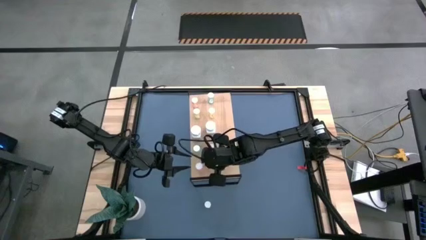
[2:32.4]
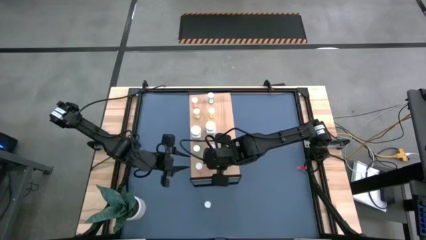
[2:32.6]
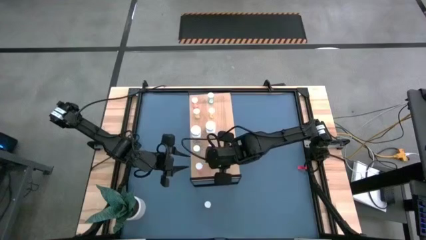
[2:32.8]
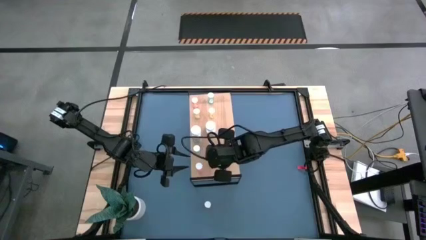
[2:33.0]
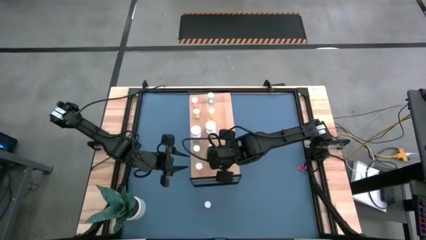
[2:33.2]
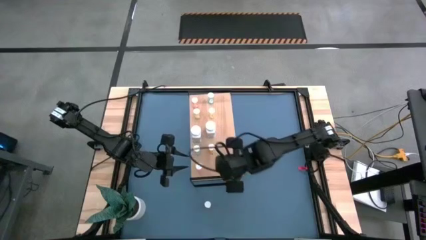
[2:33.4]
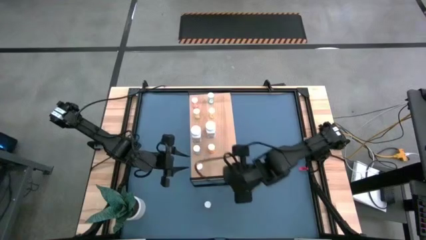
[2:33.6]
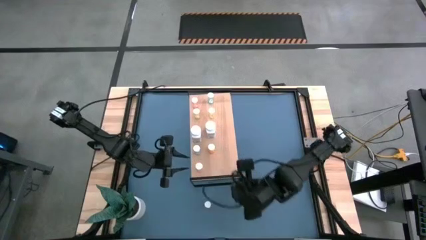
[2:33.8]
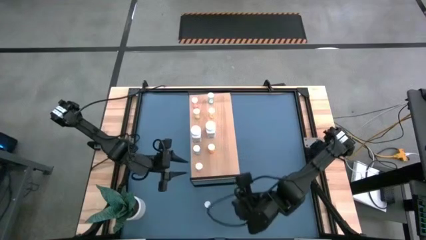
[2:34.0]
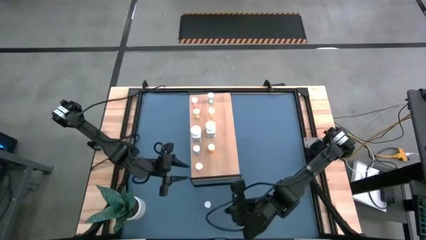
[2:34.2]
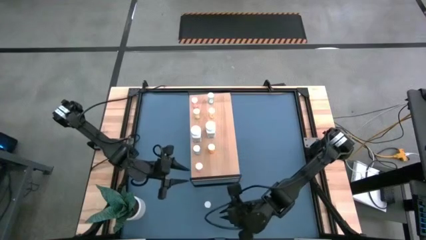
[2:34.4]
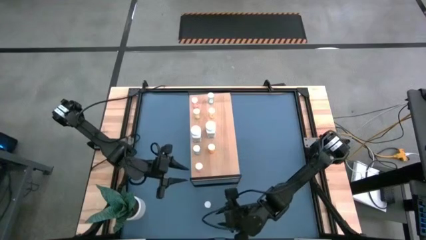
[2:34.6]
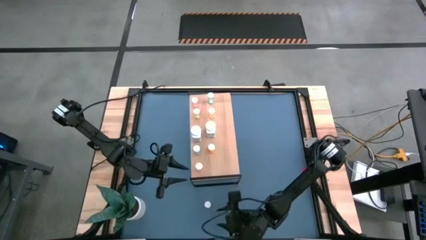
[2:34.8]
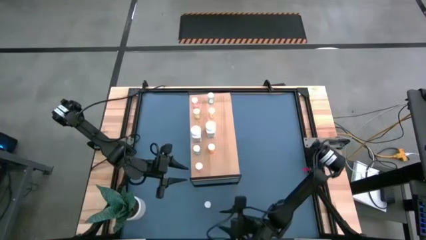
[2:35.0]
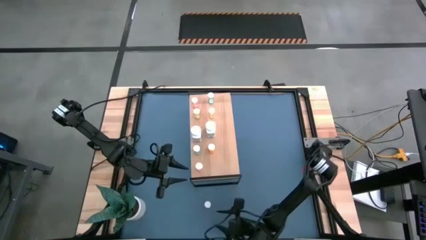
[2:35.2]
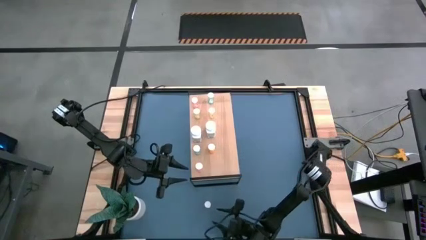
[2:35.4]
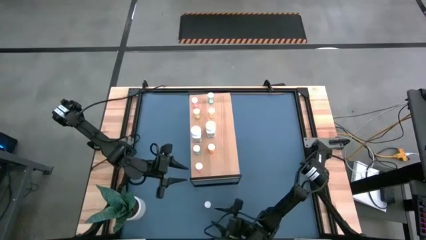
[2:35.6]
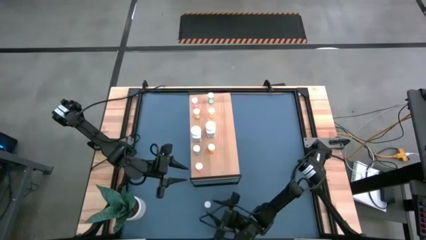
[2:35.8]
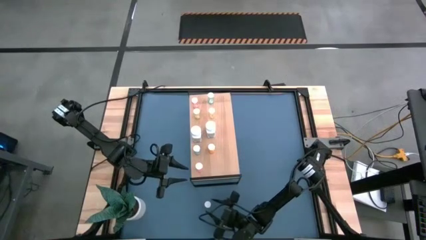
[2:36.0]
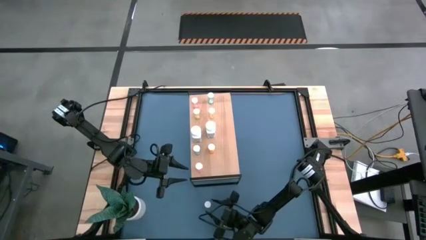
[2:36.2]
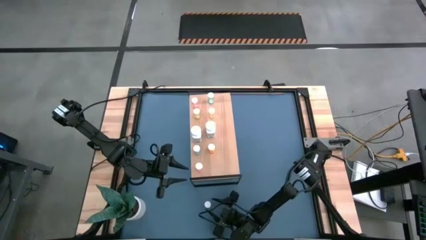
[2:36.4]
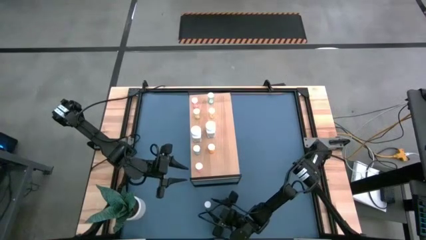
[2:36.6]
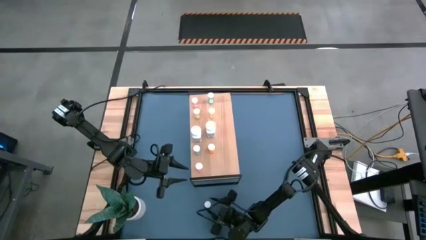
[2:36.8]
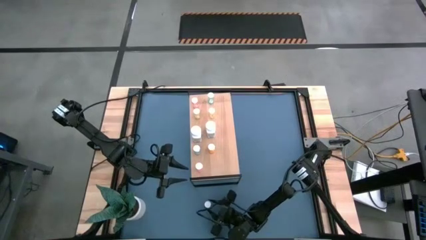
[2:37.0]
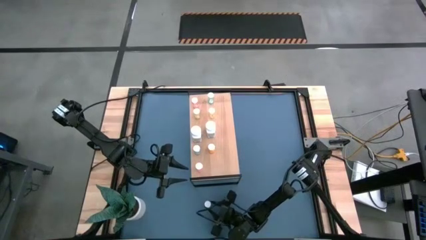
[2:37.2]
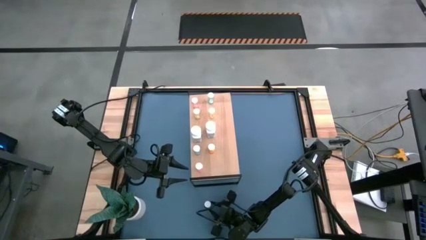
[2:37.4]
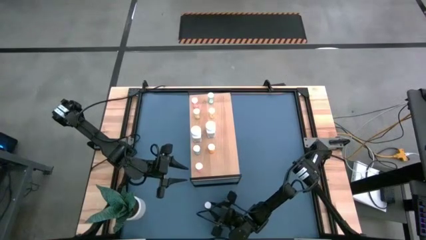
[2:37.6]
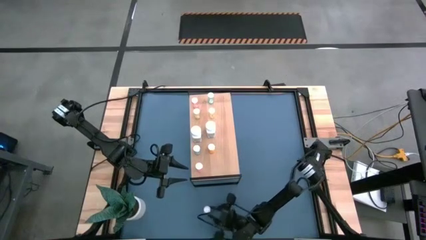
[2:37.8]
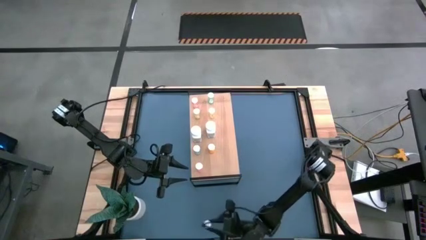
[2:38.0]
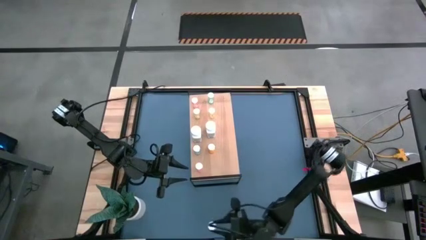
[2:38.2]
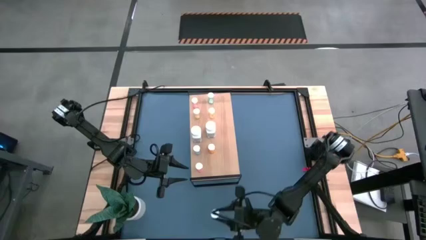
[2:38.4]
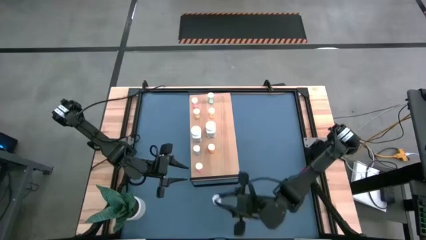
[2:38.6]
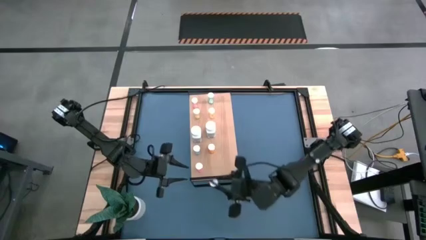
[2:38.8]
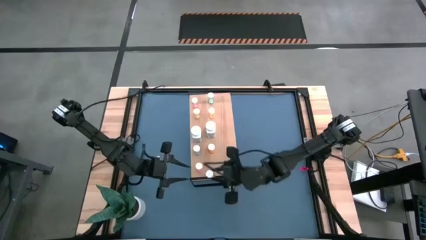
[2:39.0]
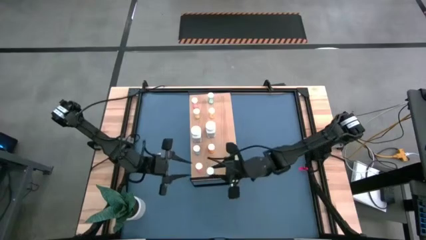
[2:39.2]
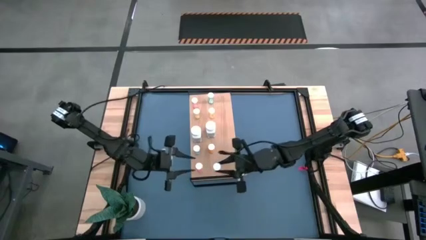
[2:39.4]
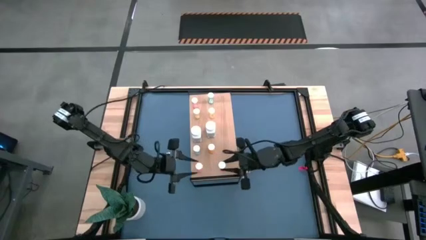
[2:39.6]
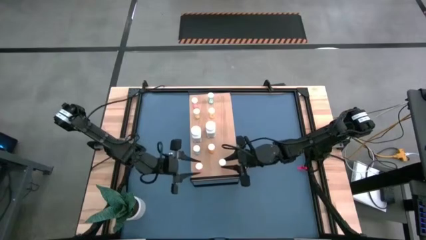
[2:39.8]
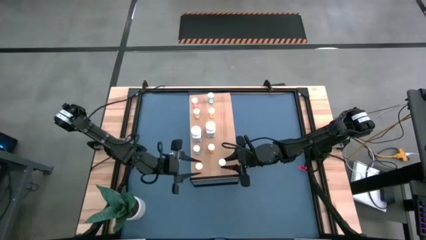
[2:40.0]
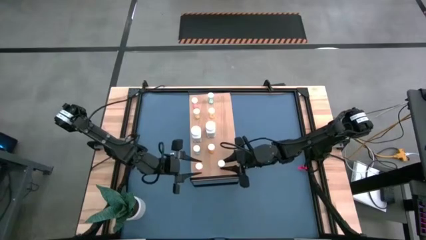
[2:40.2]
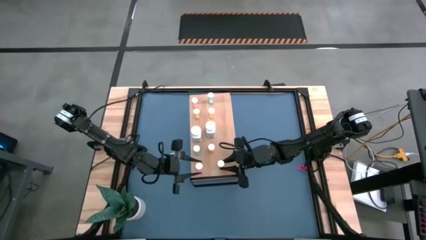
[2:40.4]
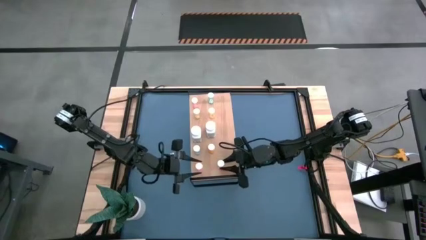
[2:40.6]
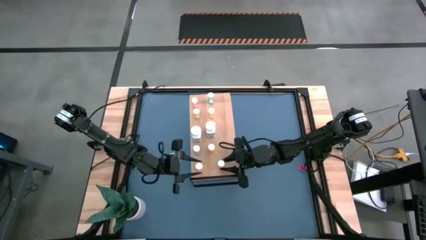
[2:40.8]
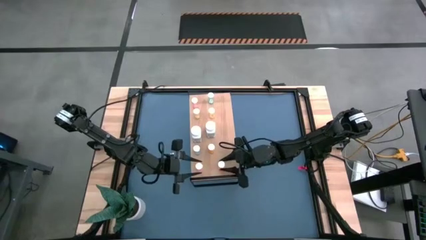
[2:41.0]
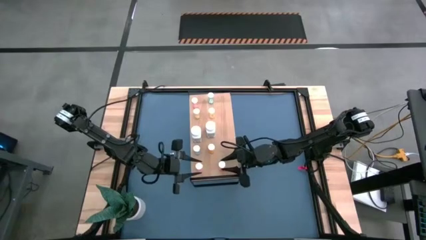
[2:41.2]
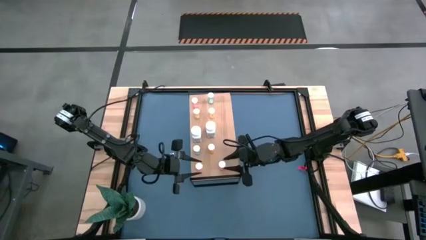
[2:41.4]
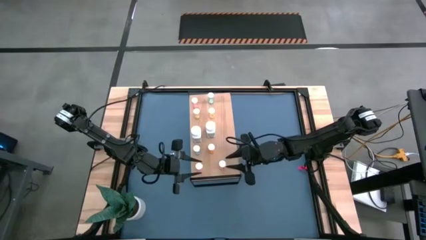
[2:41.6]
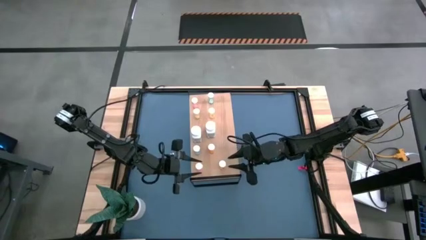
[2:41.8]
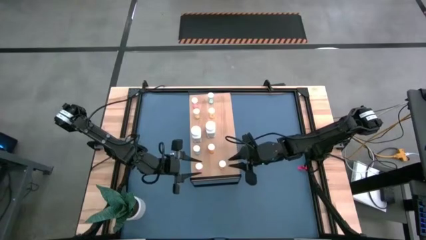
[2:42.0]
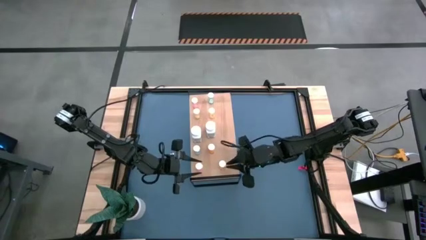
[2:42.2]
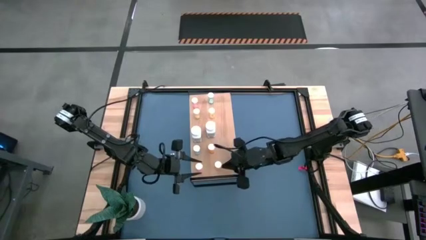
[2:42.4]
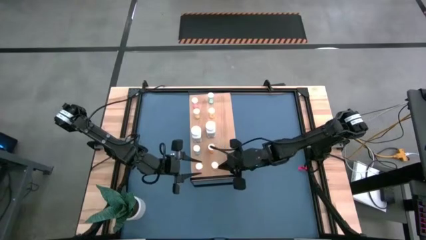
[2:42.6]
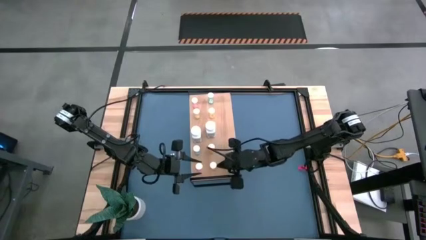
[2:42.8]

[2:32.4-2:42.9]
Task: Pick and place medicine bottles onto shelf by color
Put the yellow pill bottle on the shelf aligned with the pink pill bottle

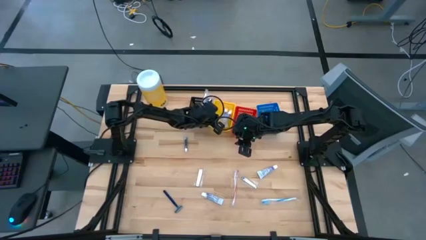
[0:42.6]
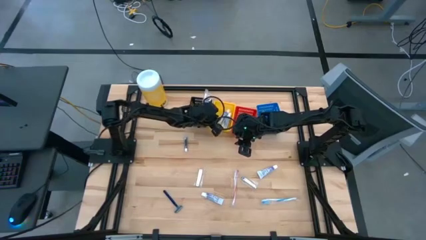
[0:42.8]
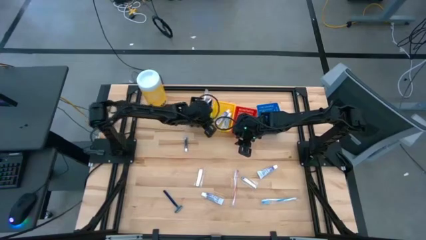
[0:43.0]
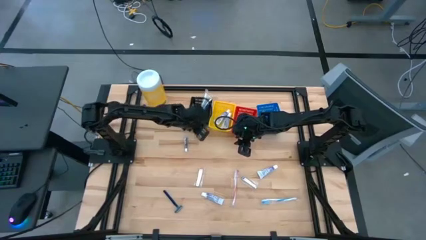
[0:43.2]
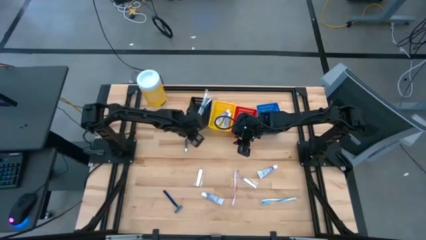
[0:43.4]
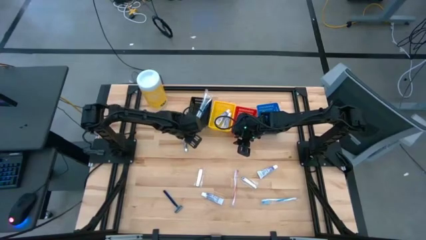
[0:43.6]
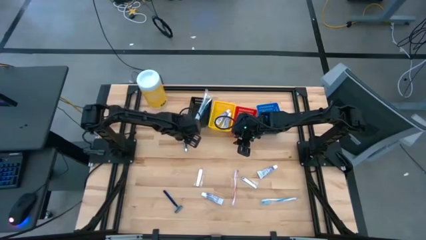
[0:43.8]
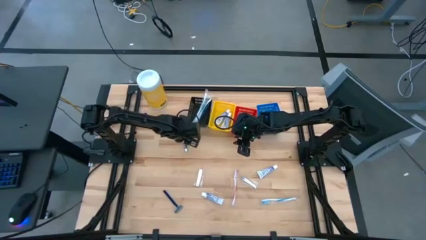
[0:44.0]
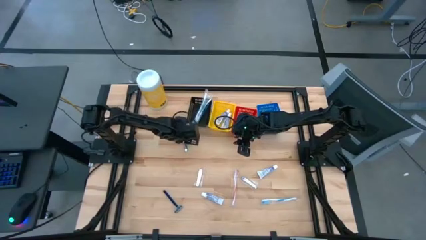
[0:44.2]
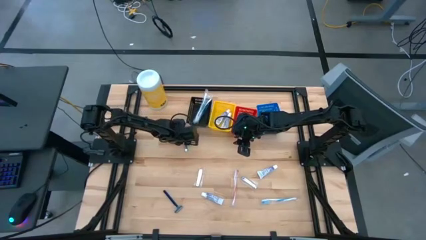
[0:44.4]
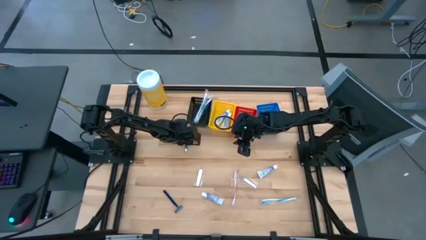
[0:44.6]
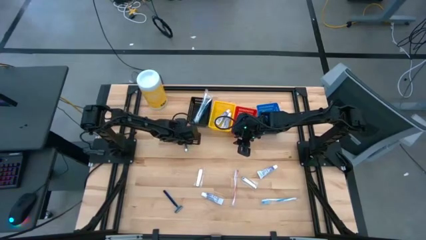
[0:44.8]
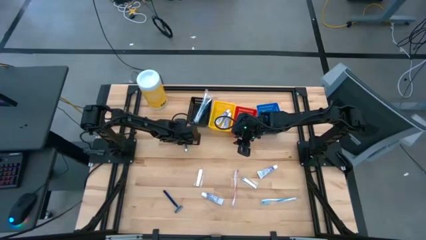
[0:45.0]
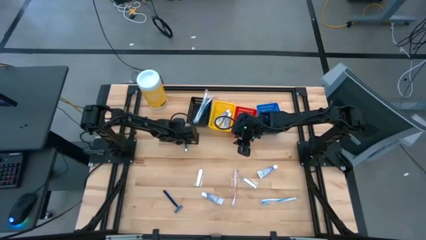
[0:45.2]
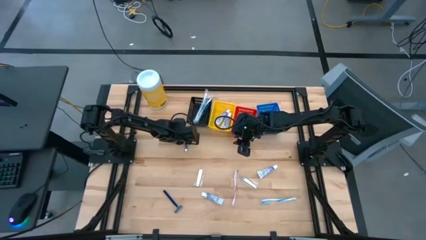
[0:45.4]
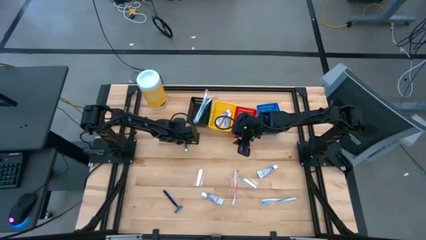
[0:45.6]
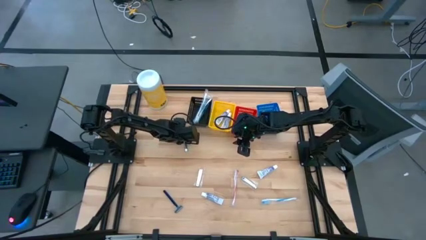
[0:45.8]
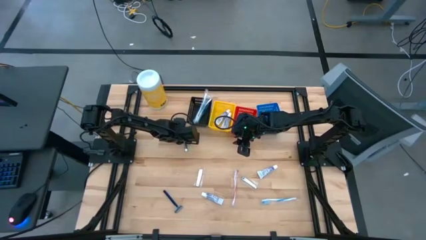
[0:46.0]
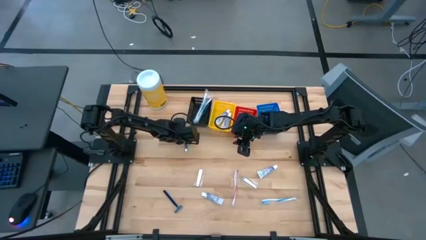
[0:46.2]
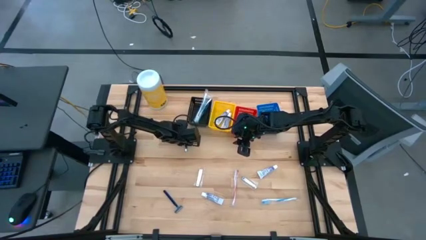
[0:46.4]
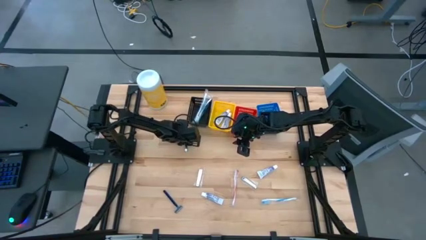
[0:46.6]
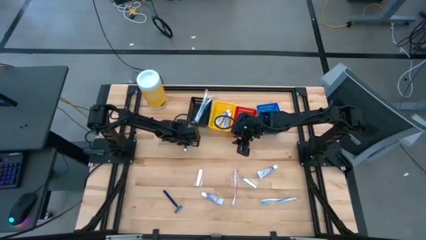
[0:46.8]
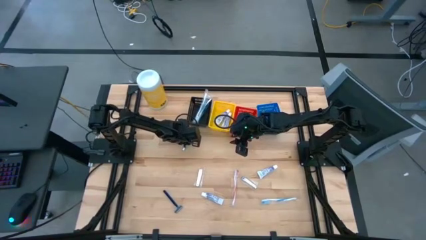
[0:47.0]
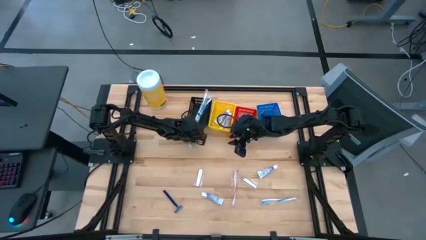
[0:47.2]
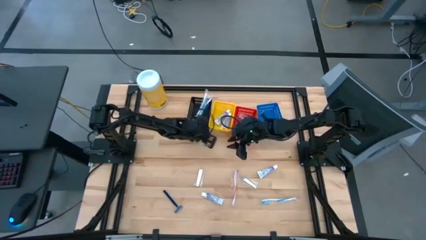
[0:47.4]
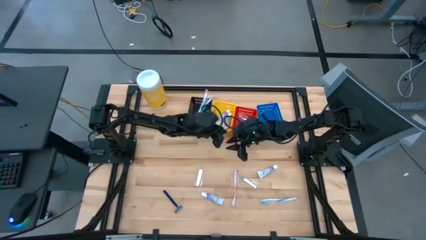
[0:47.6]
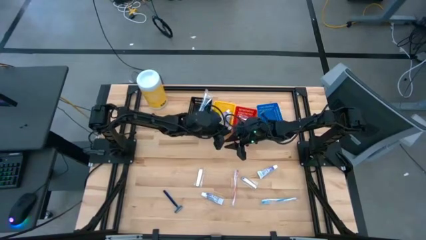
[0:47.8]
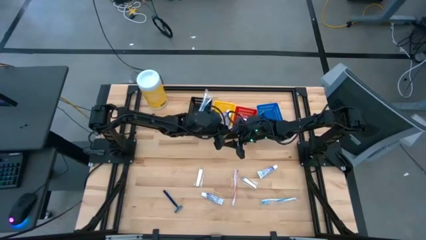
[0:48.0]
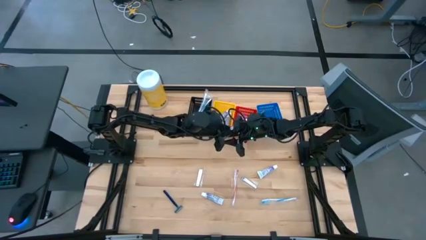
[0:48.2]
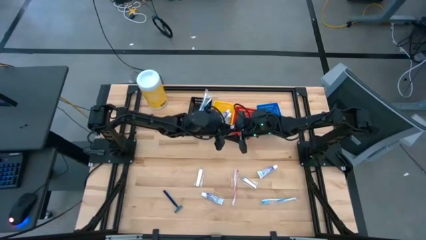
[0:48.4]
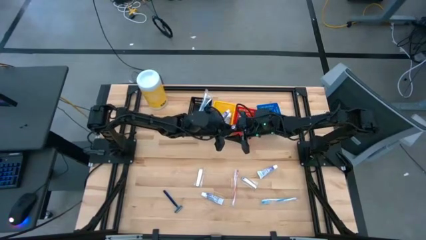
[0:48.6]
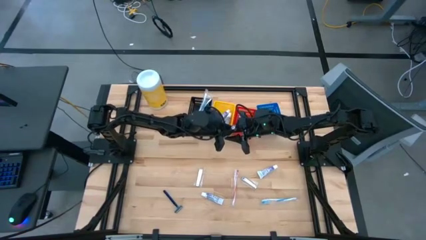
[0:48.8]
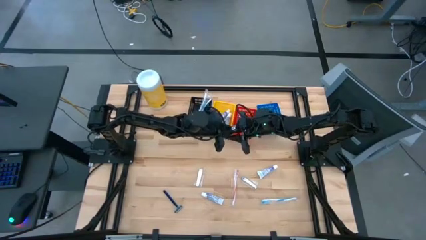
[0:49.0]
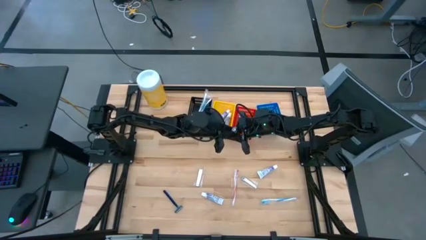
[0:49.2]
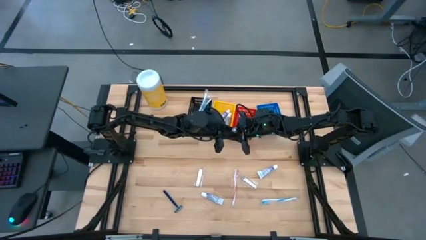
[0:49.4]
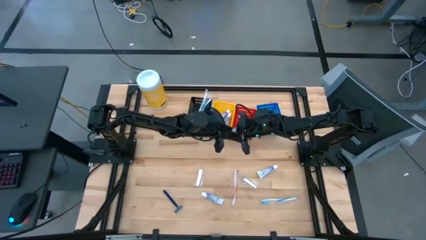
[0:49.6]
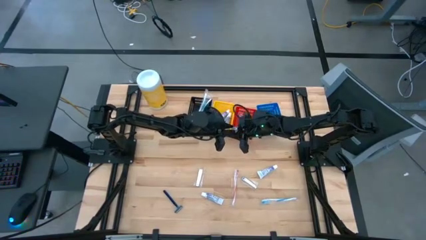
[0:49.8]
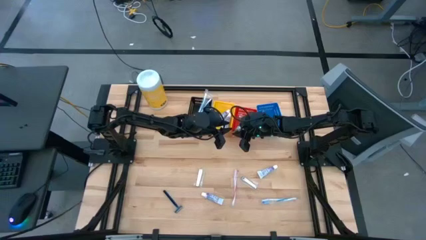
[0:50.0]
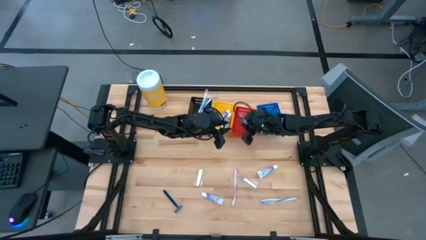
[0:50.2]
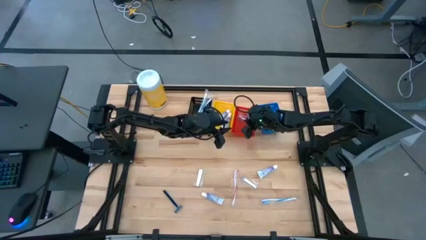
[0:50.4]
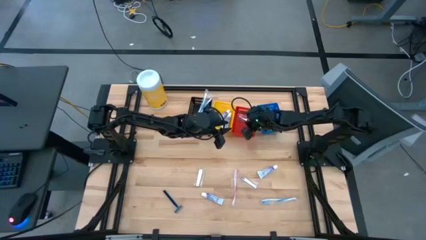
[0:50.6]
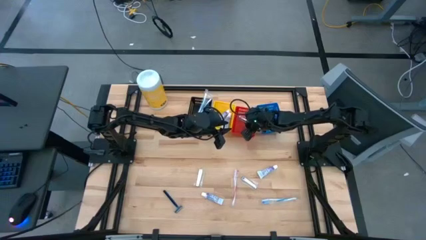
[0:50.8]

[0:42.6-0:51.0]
Task: Pick & Place Travel size toiletries
Put the silver nail cutter into the red bin
